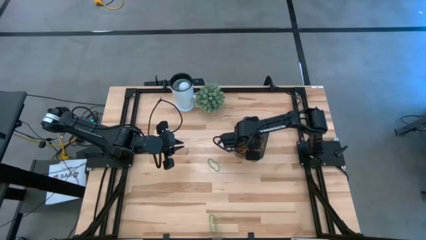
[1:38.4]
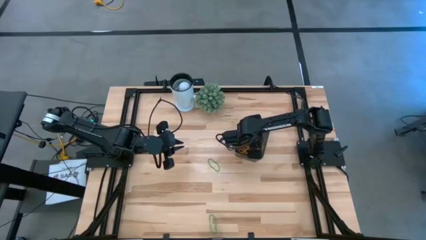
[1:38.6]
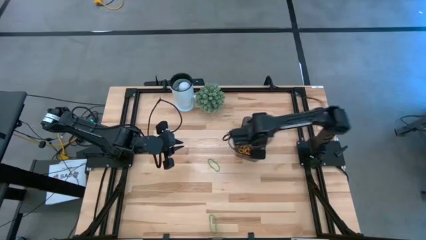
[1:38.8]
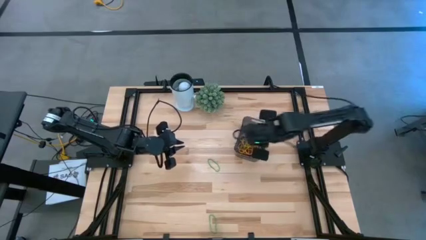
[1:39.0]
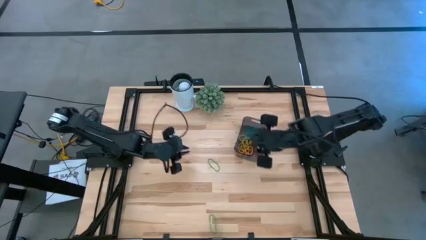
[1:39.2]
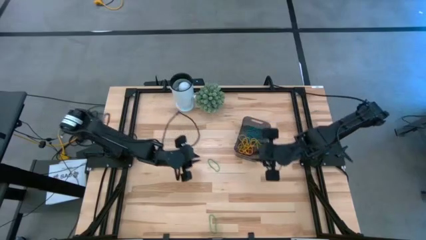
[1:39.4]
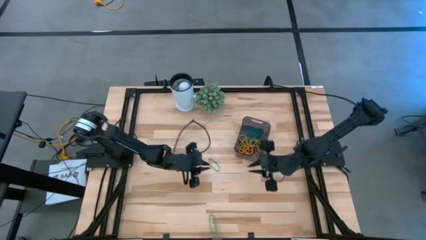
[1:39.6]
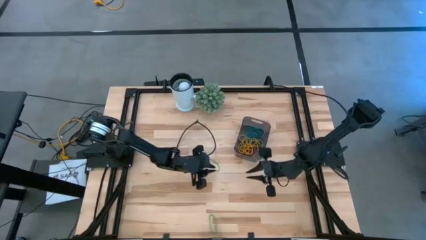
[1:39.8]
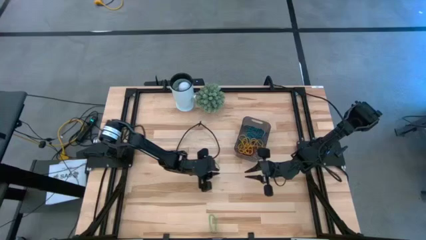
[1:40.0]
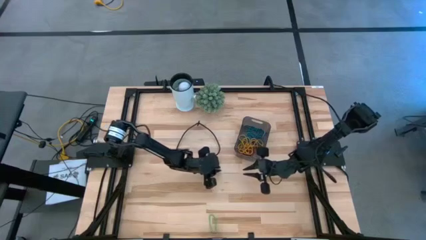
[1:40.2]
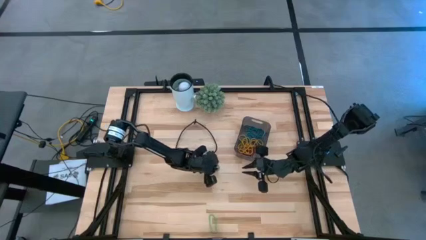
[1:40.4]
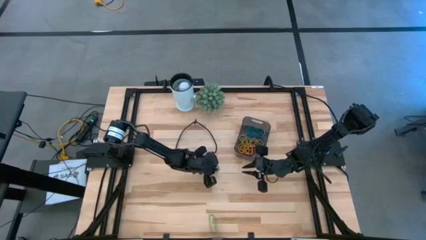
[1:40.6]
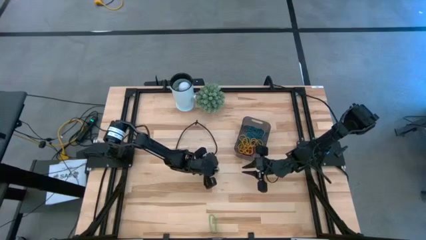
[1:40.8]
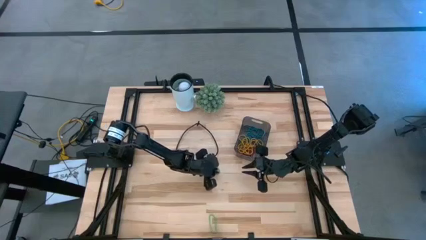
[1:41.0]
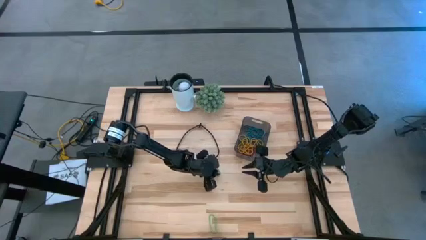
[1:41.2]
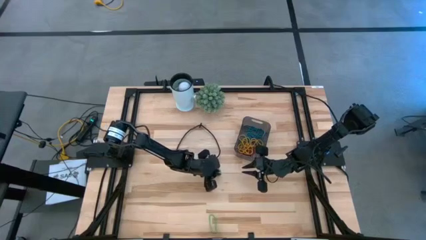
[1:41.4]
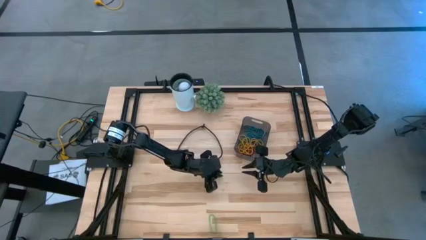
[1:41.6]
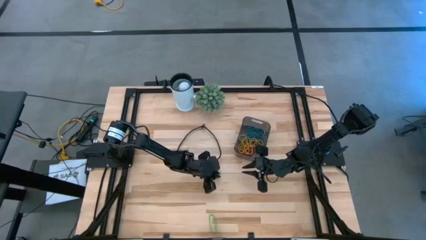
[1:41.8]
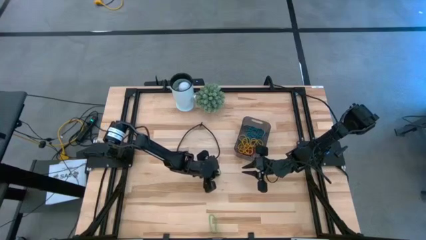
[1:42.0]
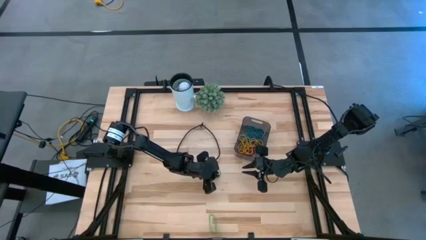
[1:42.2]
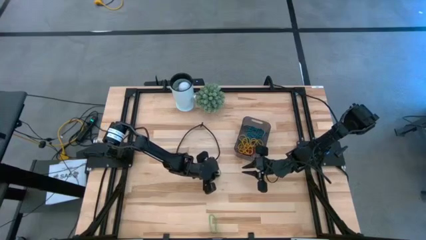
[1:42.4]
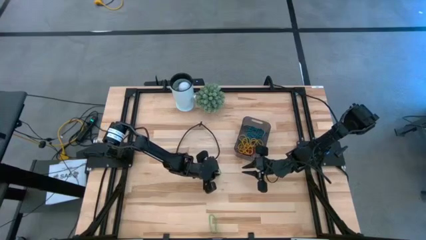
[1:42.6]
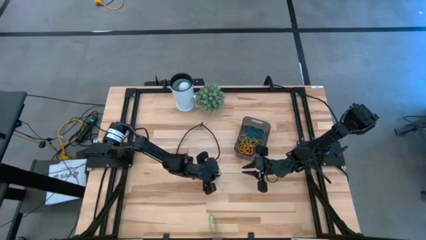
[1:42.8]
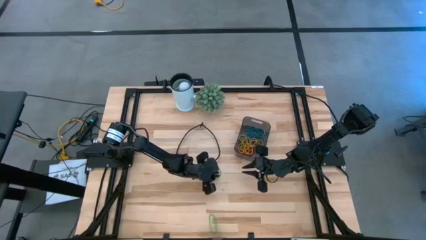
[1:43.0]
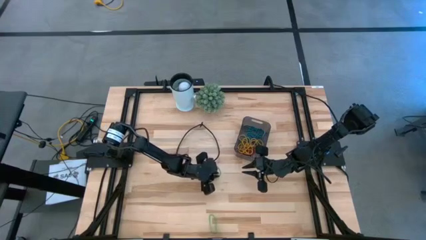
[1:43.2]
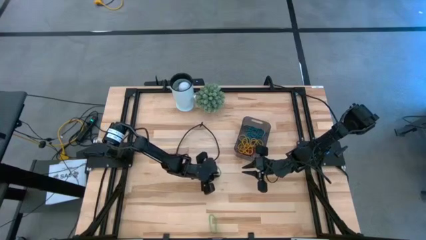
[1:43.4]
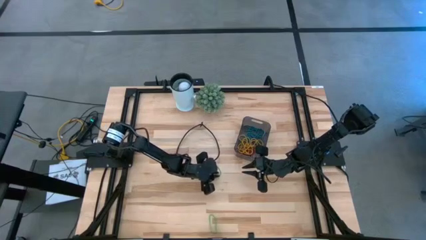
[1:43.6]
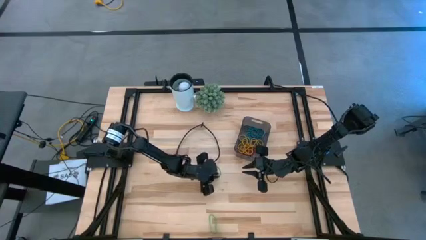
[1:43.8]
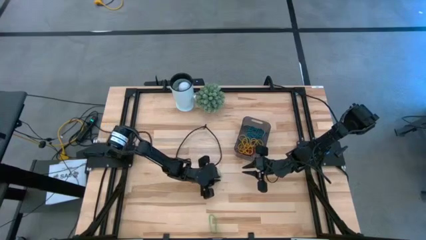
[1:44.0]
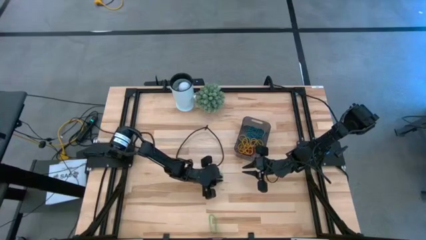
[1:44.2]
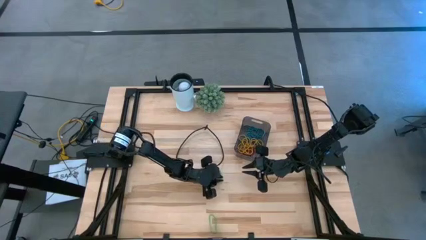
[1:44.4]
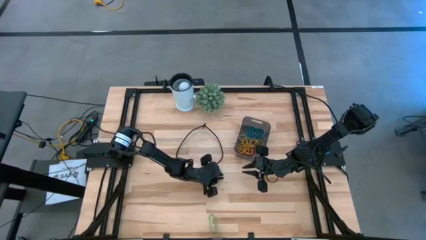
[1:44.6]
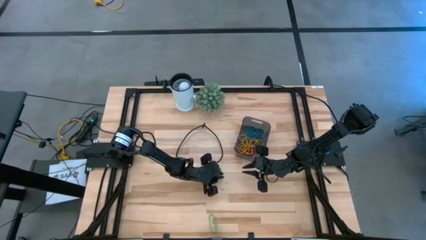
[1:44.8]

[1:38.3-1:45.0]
Task: Pick and place items into bin
Put the green rubber band into the black bin

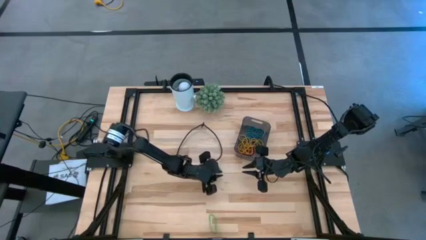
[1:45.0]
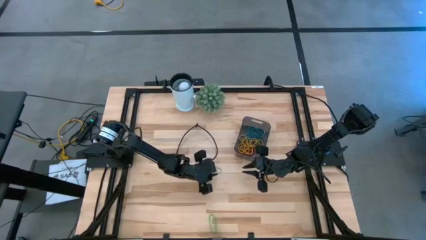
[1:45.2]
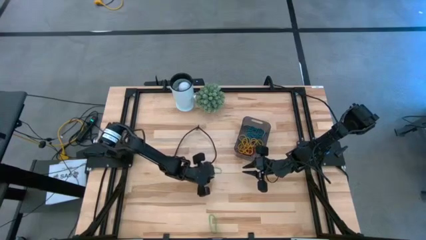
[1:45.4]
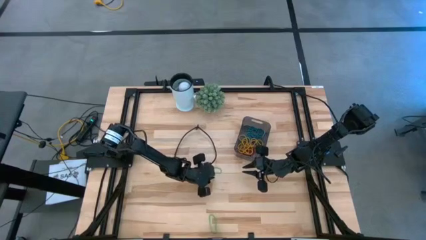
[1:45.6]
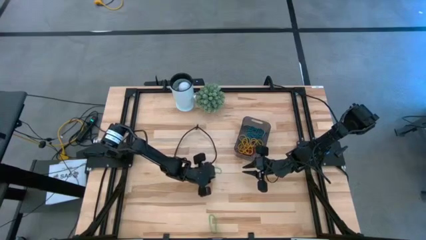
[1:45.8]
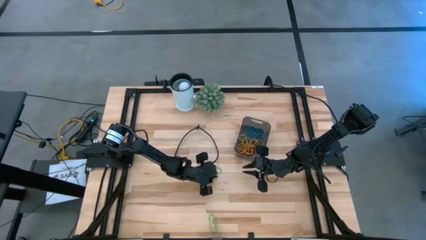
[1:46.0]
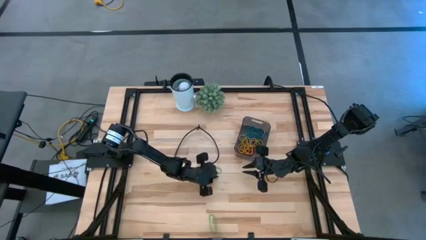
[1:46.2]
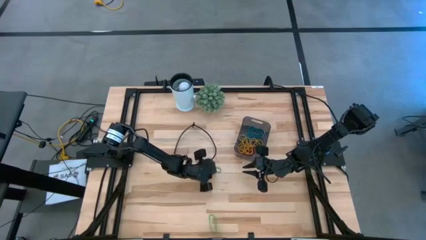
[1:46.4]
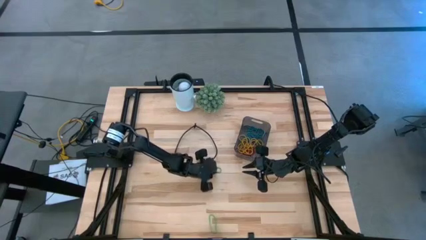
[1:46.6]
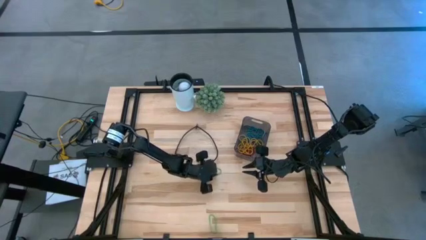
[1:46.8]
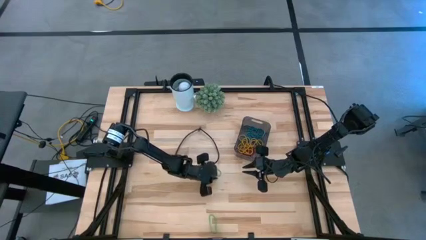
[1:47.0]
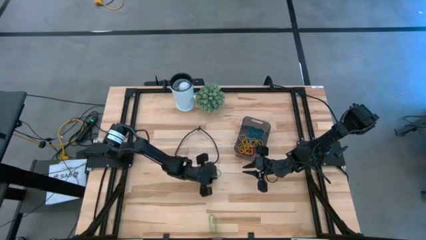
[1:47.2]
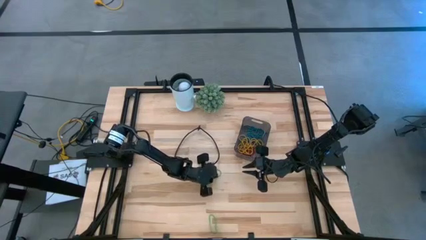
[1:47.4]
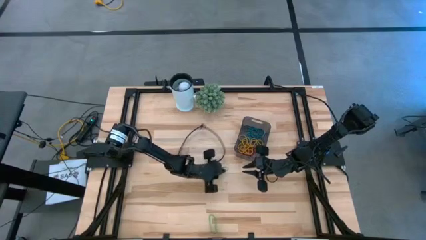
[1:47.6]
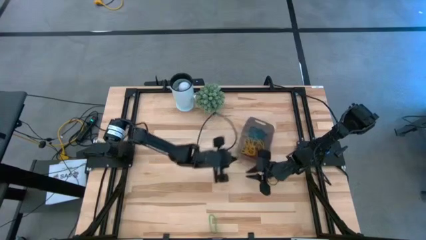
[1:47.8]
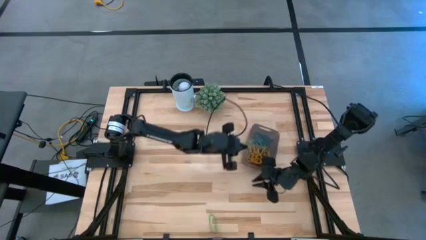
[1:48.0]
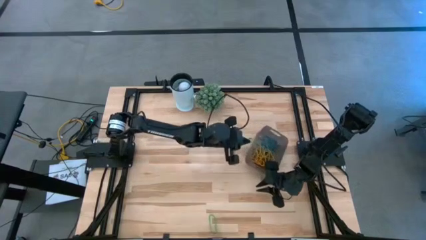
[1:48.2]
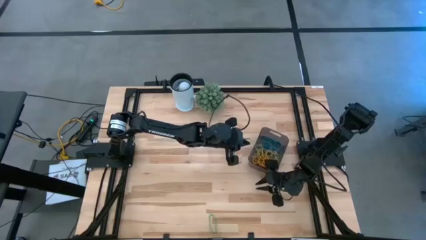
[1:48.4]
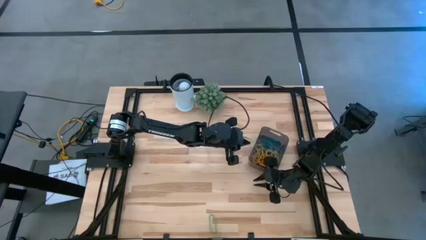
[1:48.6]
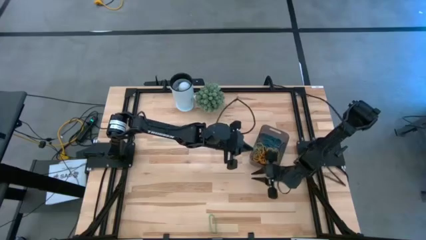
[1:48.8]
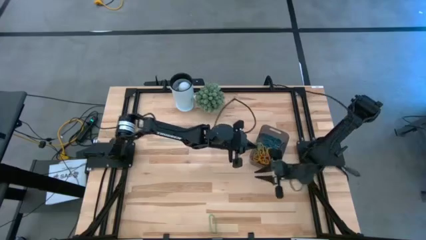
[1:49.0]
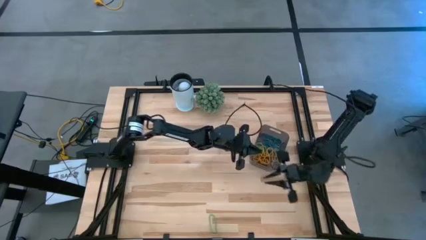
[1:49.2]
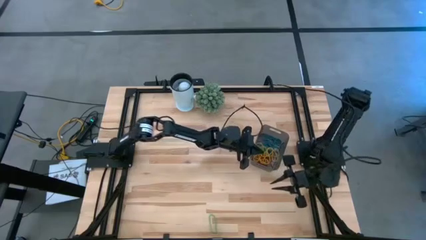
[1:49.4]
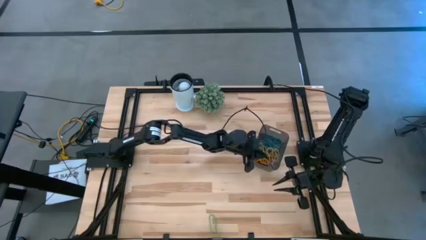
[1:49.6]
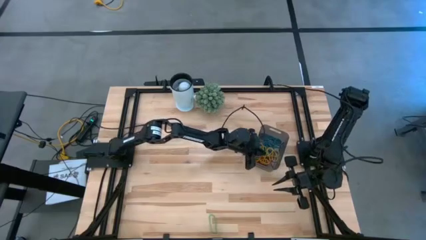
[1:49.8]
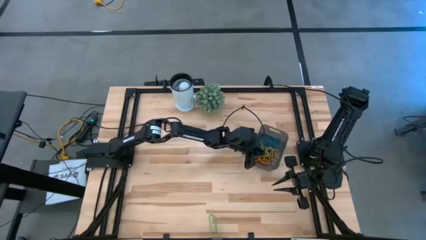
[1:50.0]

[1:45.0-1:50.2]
Put the green rubber band into the black bin

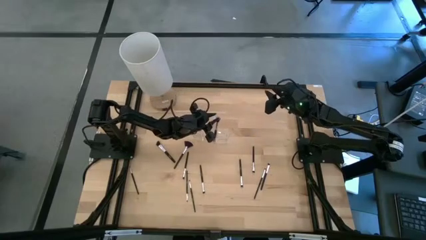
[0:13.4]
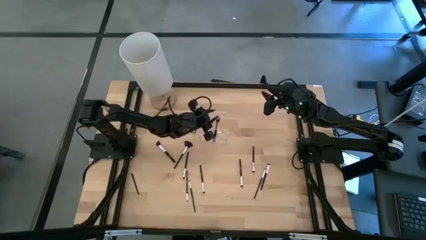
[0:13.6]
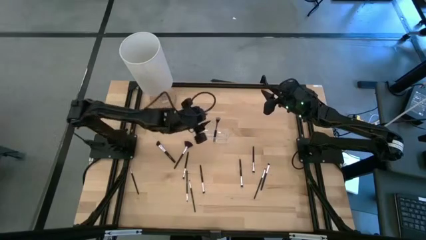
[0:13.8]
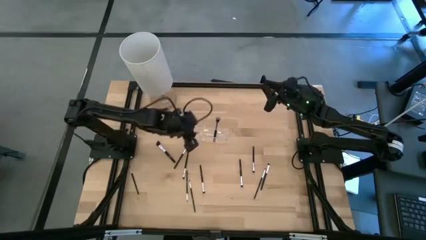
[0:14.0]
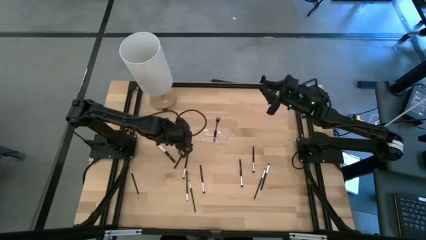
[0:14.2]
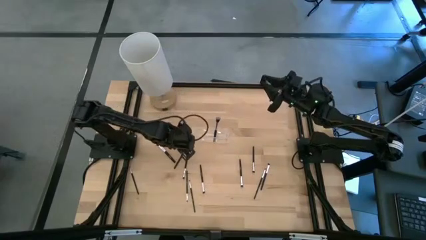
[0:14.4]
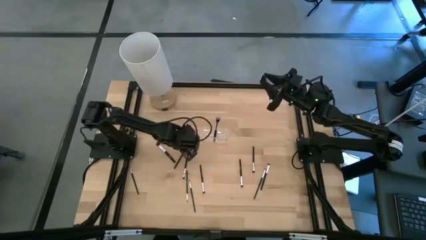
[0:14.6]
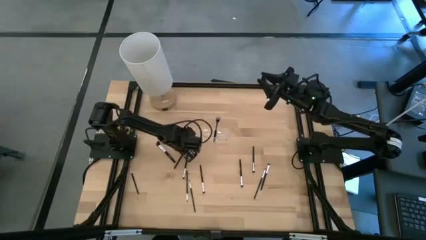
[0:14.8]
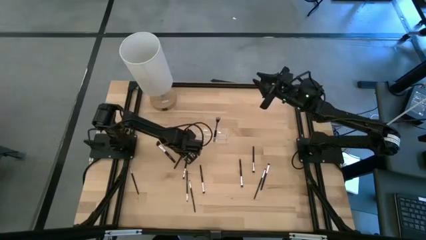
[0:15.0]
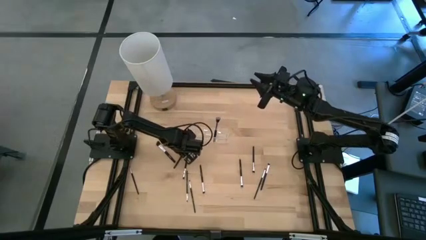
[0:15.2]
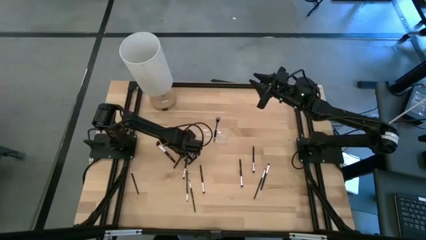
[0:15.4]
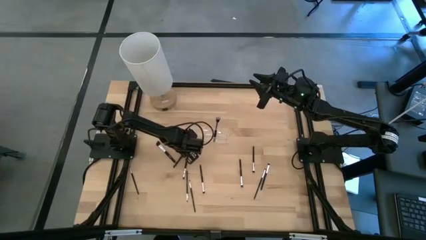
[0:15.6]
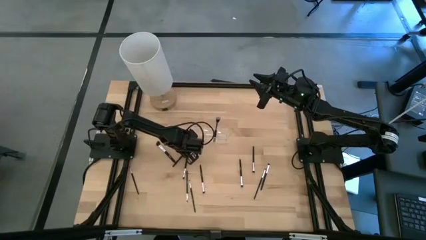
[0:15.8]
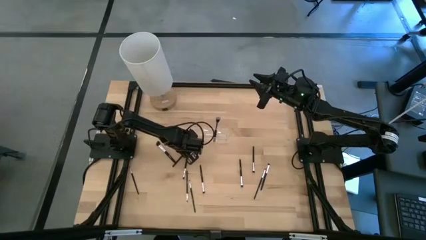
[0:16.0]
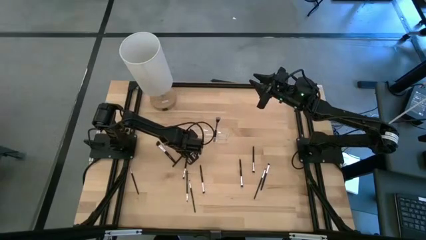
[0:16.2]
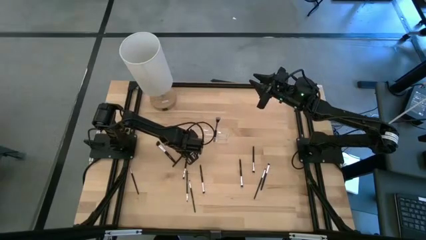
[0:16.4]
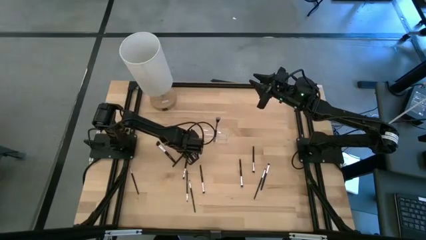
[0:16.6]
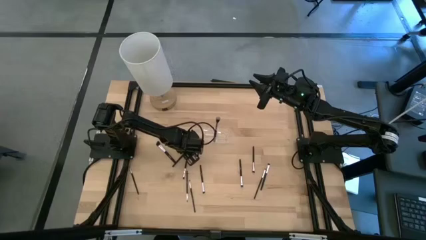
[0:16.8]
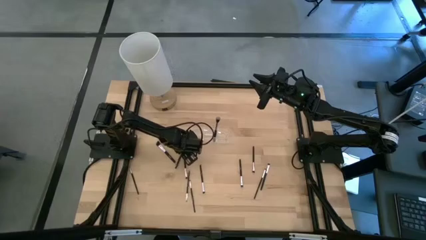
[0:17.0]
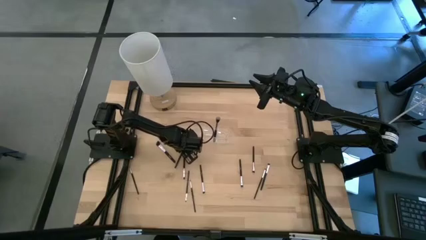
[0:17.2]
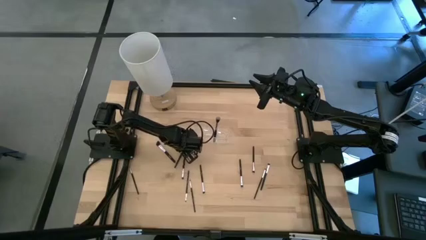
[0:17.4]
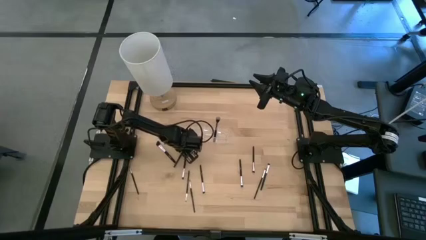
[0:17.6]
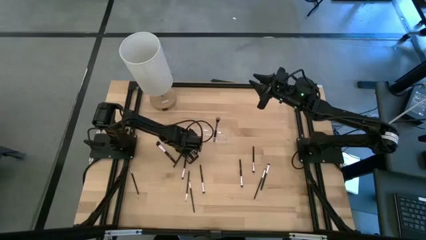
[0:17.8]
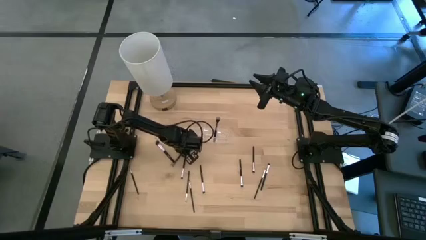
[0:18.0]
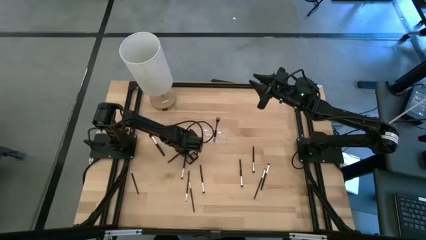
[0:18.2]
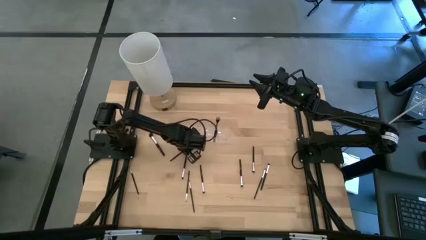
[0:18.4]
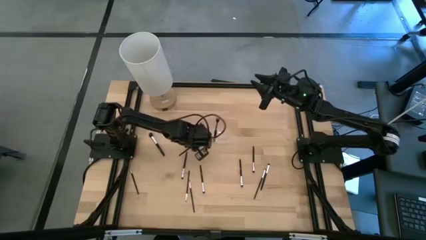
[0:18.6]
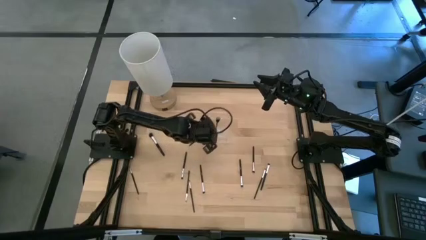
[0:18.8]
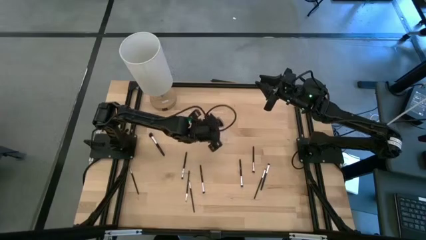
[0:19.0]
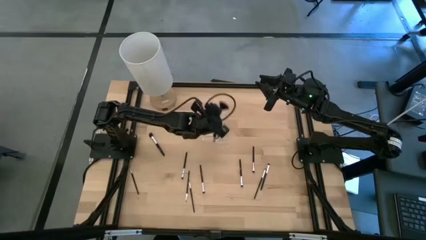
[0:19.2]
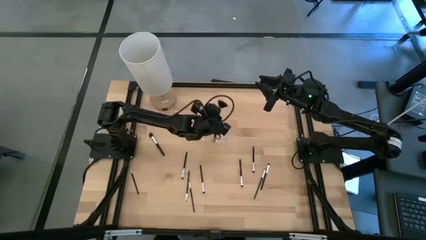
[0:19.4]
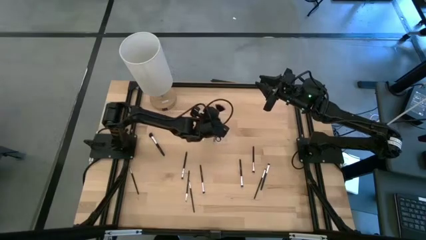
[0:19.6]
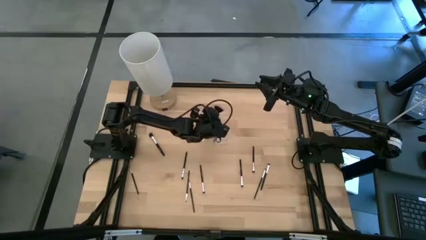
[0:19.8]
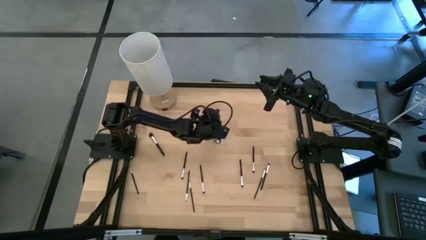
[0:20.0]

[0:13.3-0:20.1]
Task: Put items in baskets/containers
Put the black highlighter brush into the transparent organizer
